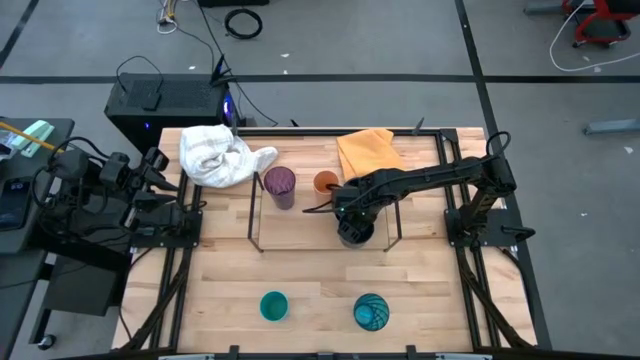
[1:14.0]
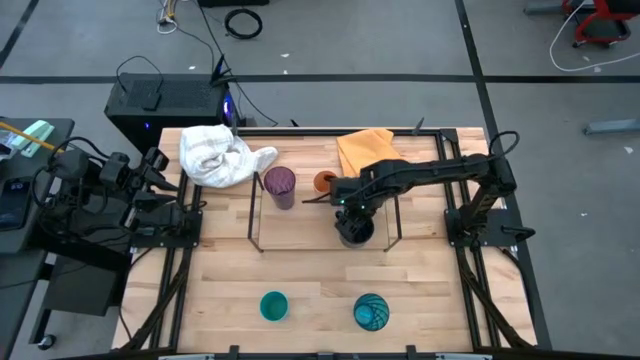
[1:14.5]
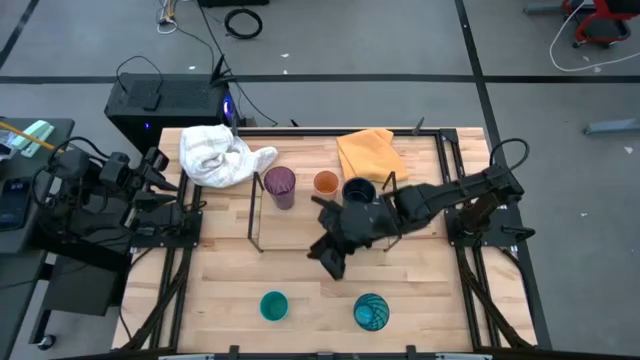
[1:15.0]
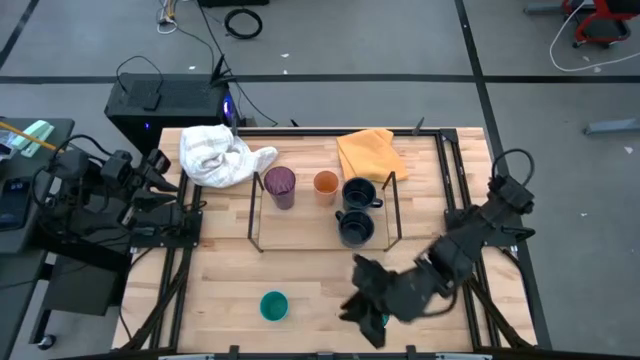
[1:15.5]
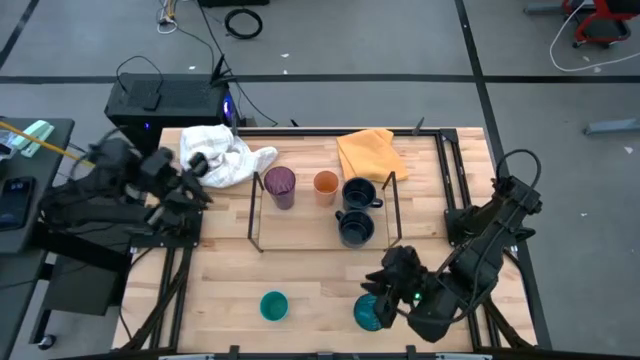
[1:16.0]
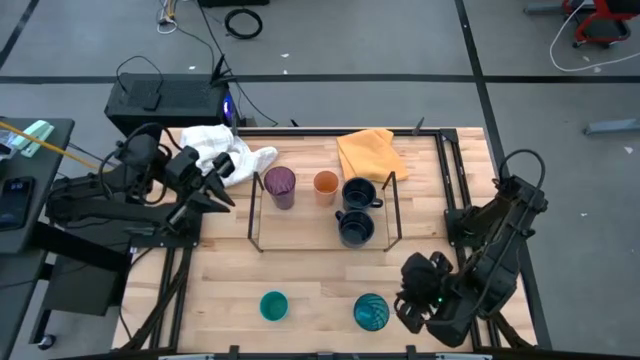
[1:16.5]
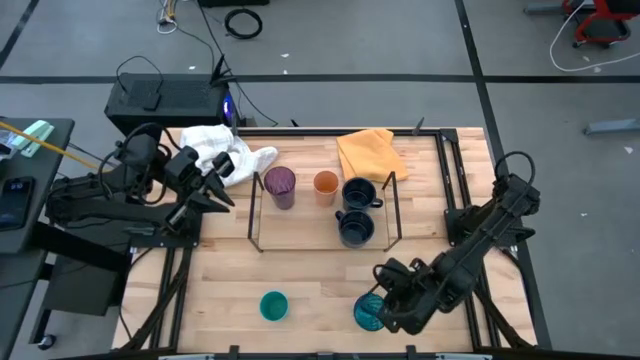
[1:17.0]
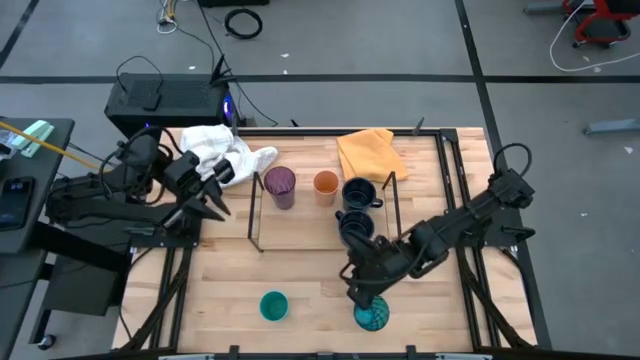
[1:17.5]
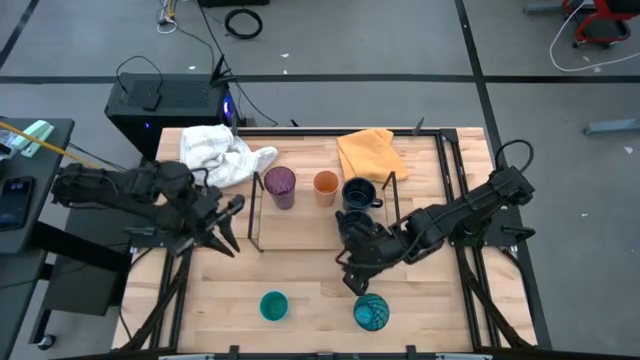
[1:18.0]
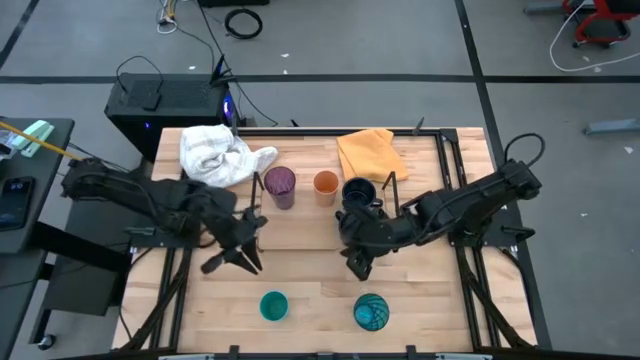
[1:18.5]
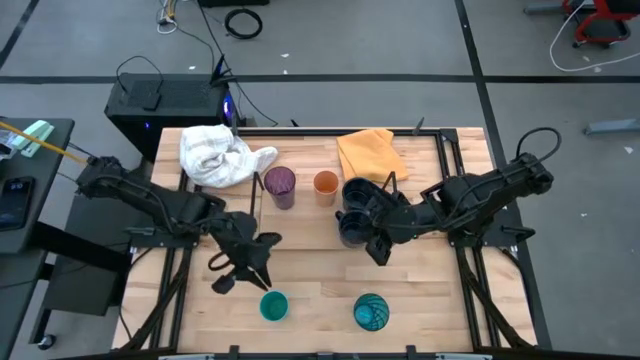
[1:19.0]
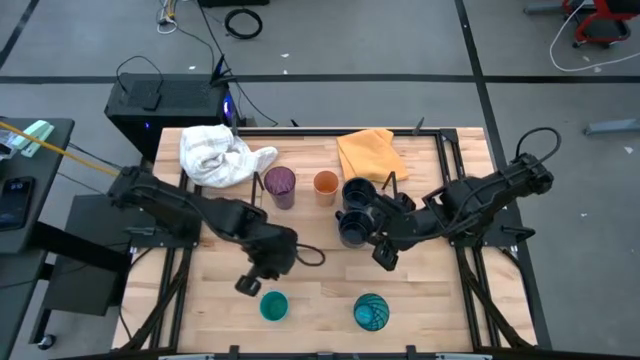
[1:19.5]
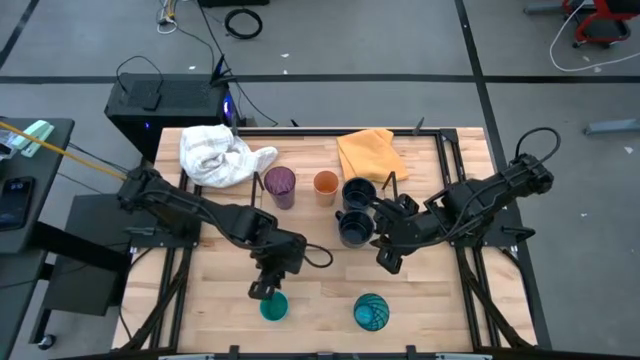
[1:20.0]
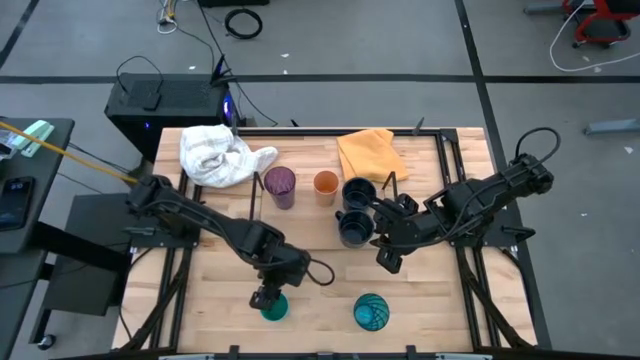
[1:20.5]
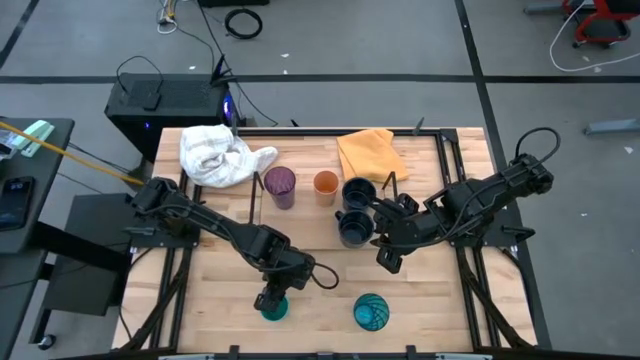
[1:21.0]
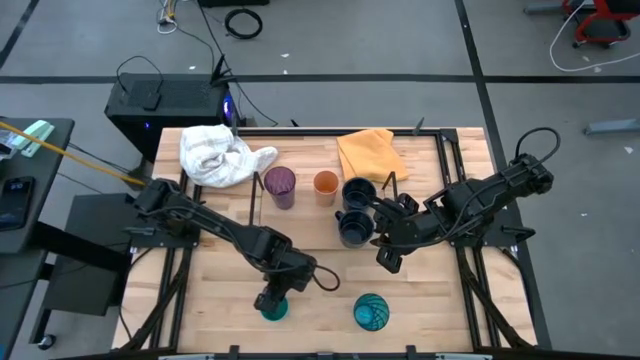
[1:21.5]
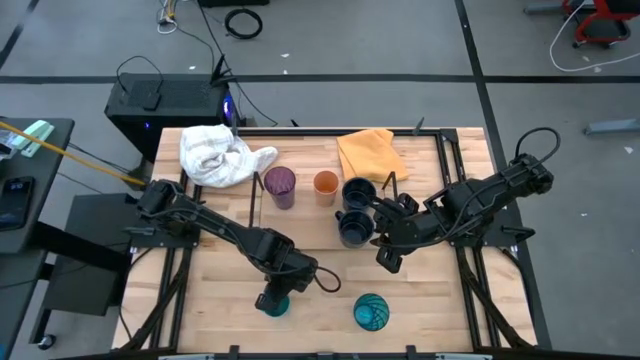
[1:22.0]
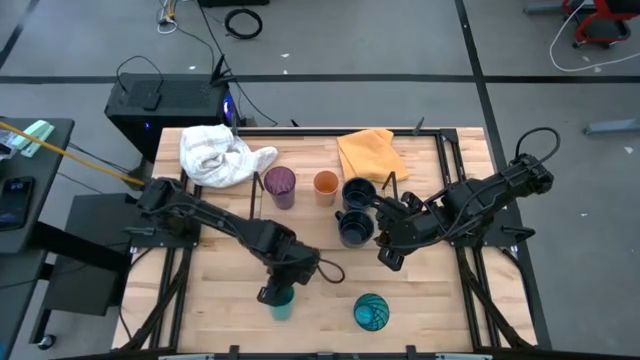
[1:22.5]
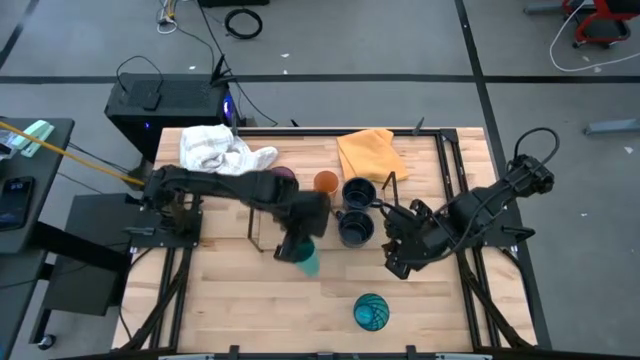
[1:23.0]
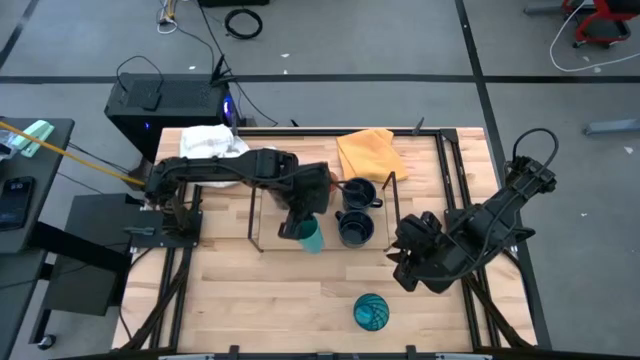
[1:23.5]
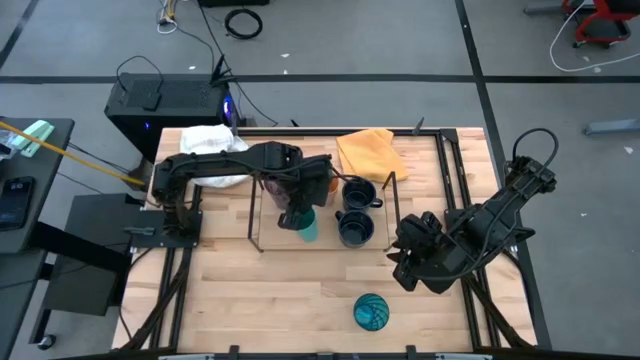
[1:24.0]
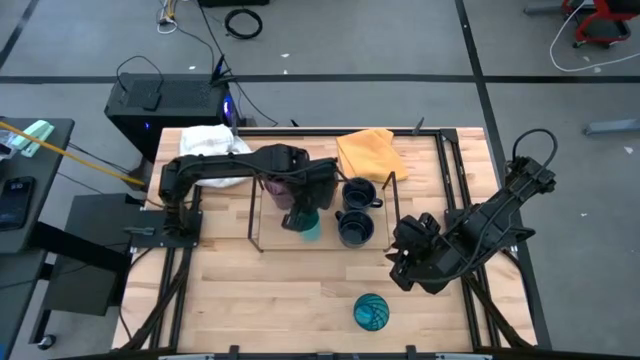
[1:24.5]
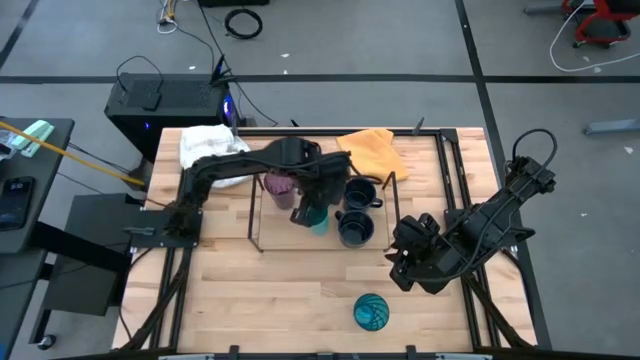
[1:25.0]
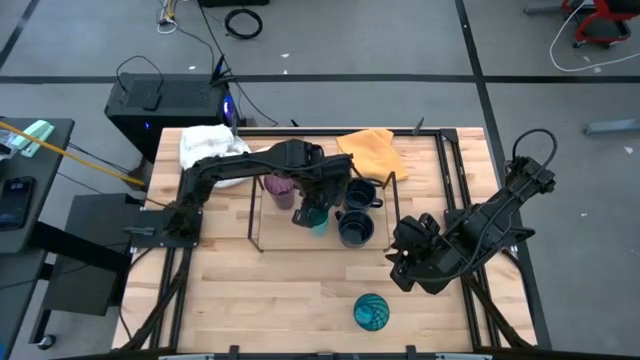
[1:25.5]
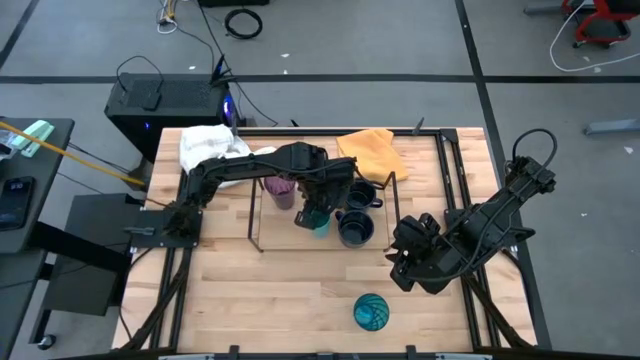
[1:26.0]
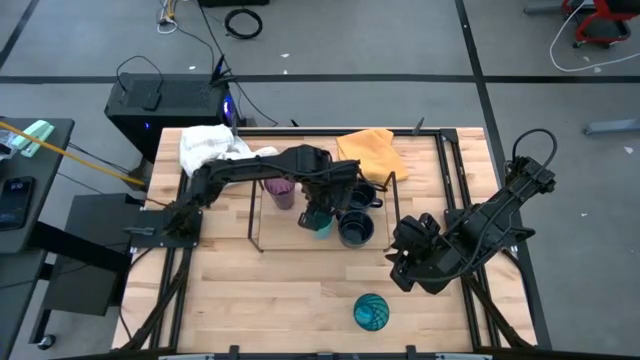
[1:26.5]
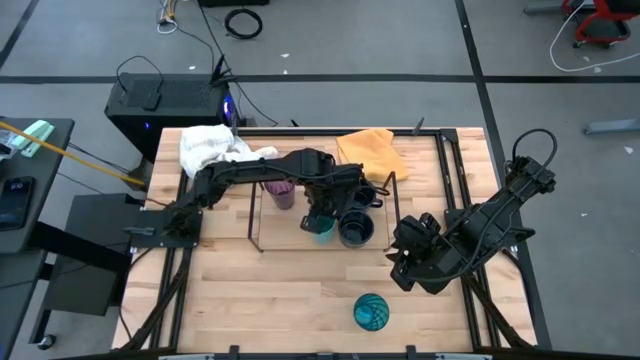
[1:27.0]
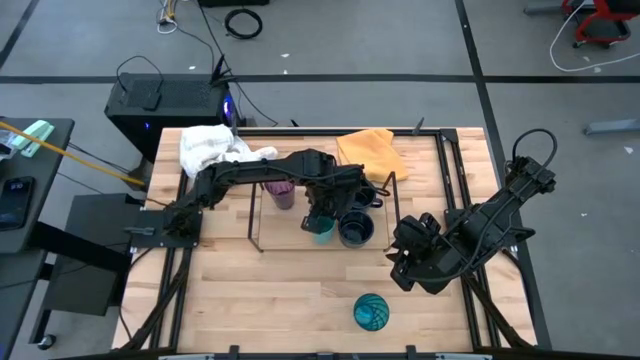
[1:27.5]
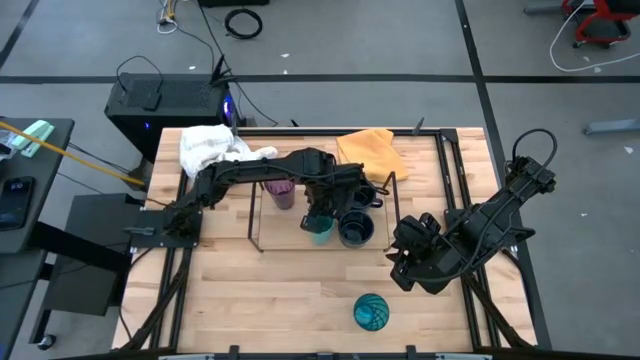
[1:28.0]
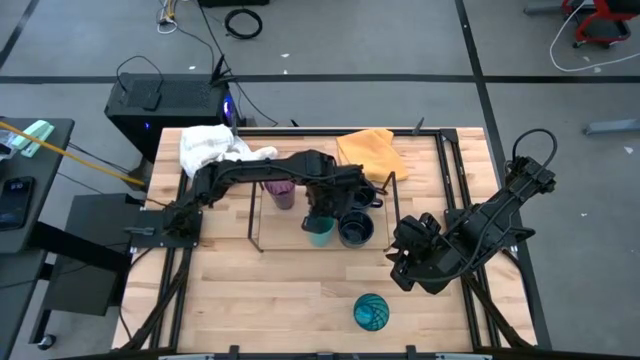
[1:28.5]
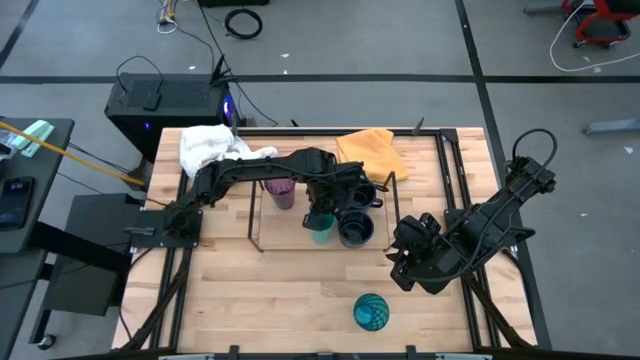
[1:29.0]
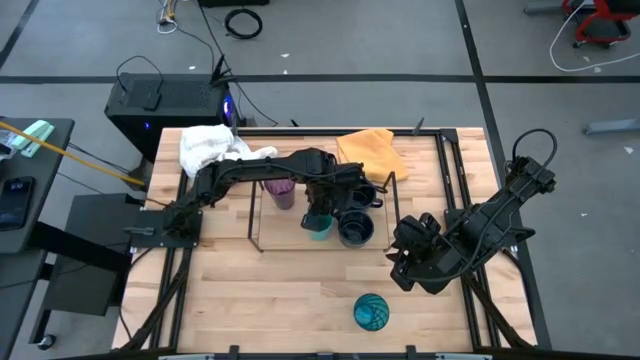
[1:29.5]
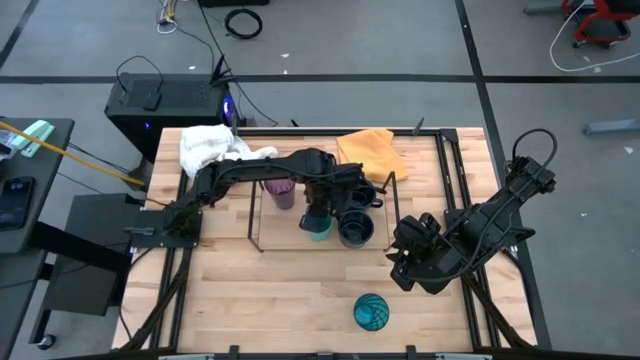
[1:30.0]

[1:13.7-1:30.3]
Task: Stack small to large cups/mugs on shelf
Put the blue cup on the shelf

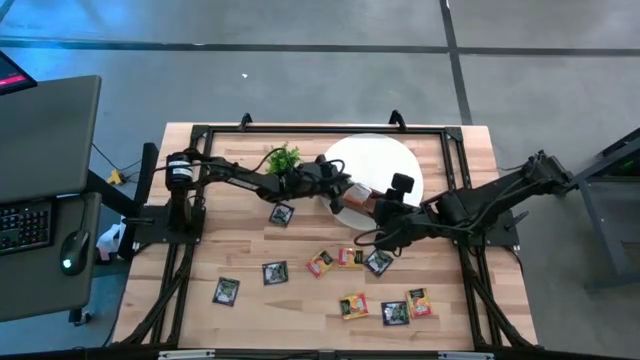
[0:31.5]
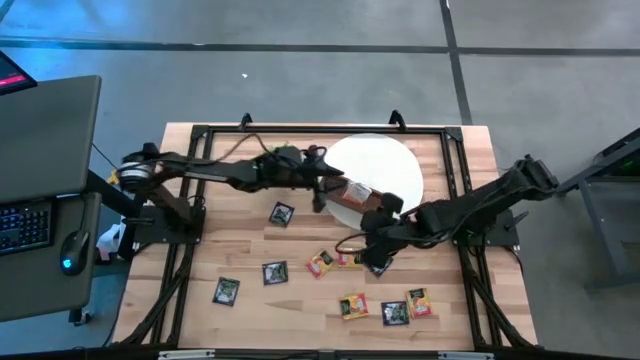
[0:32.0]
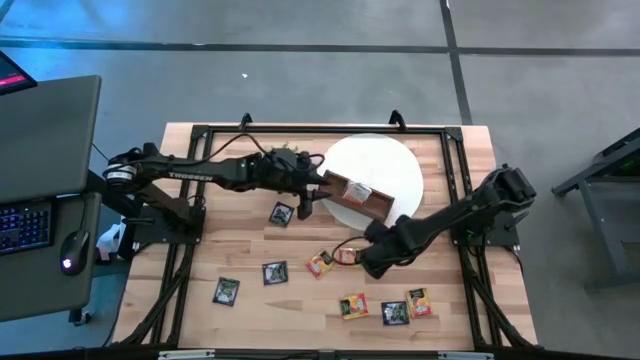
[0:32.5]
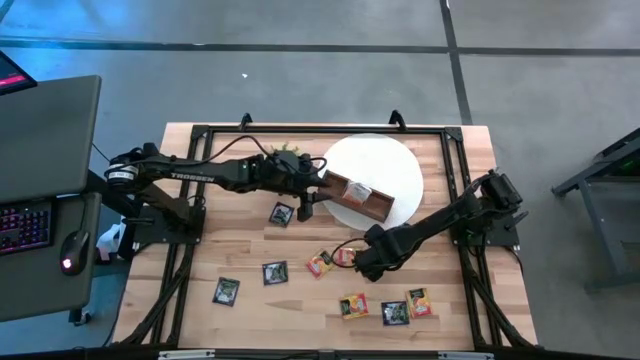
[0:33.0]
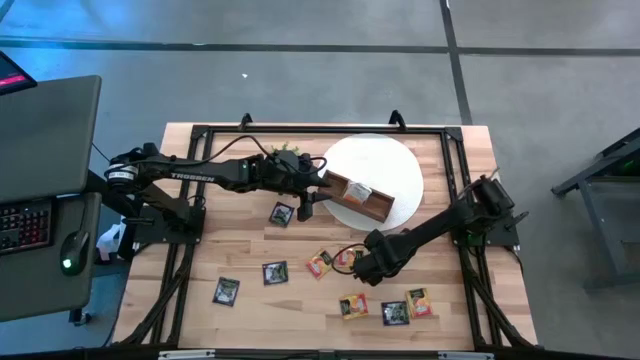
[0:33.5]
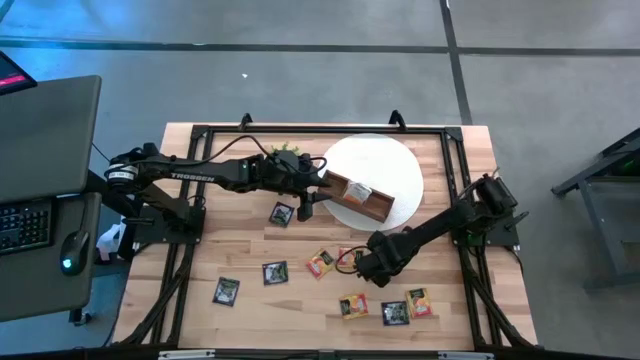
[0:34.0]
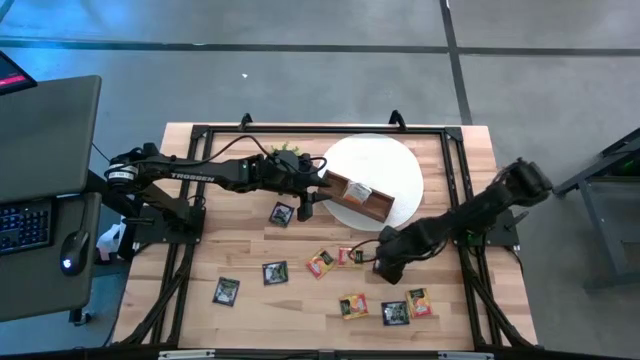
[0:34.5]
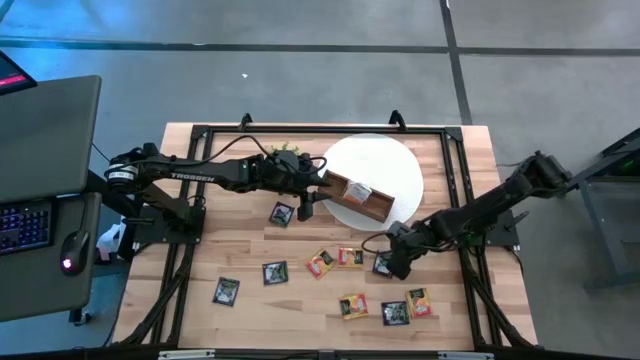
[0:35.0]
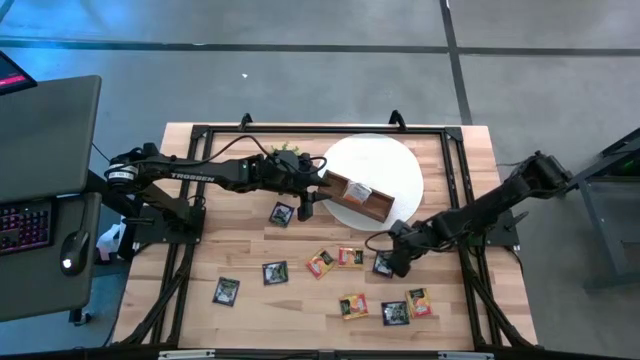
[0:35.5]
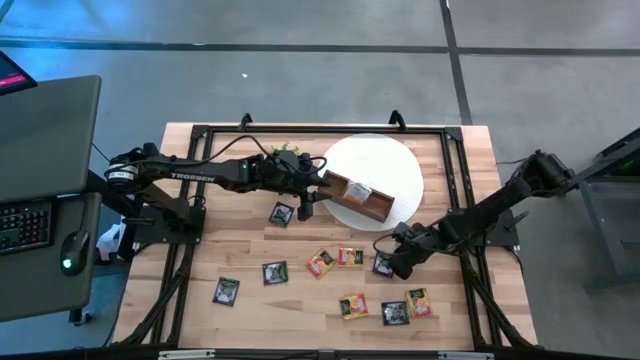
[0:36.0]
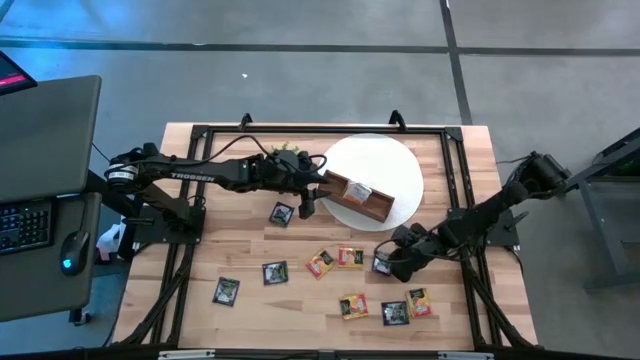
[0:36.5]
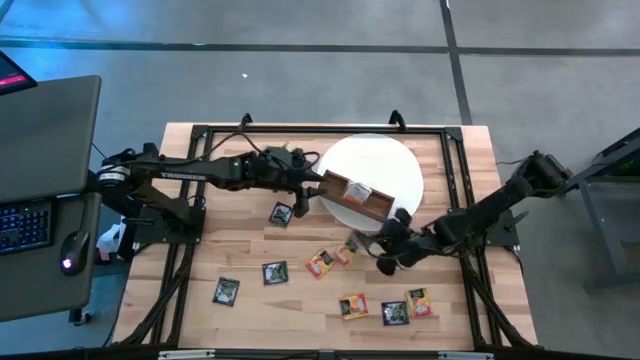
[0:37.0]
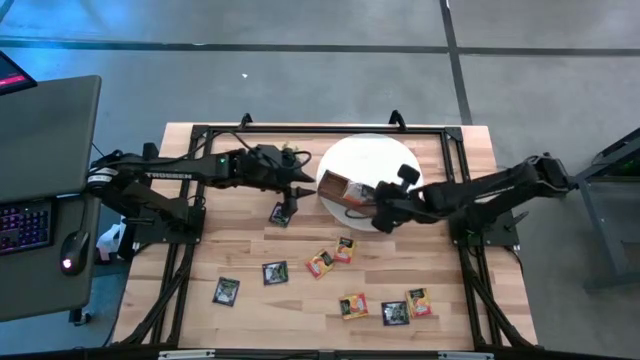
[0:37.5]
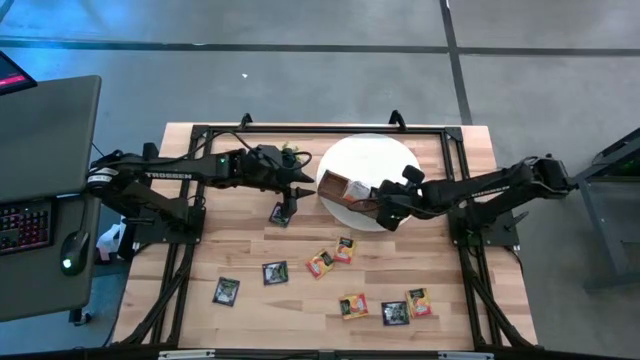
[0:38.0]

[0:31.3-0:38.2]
Task: Pick & Place Tea
Put the purple tea bag into the right compartment of the wooden organizer
